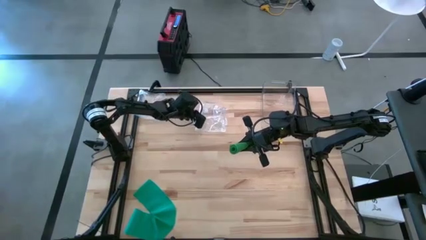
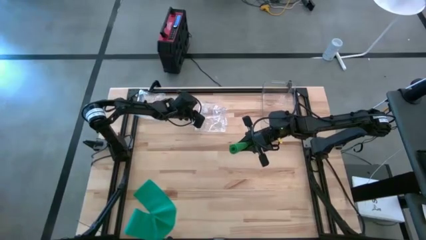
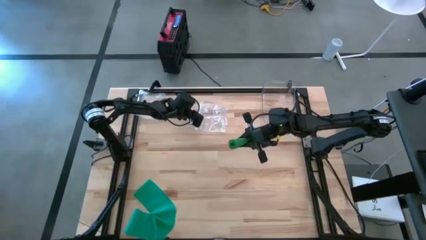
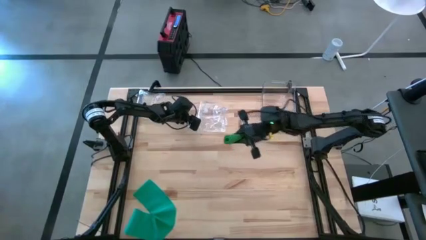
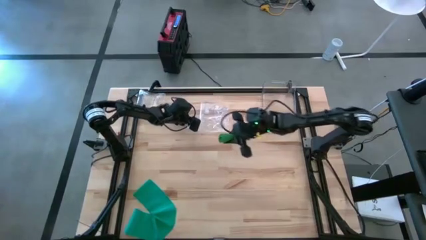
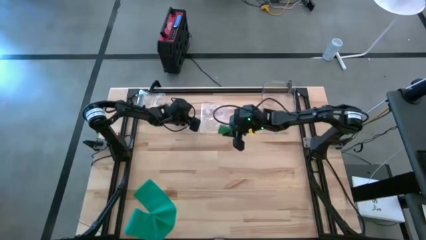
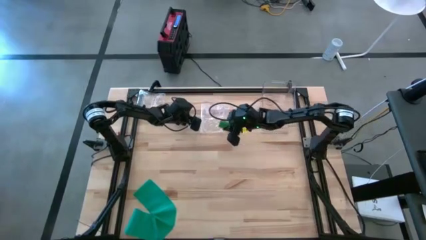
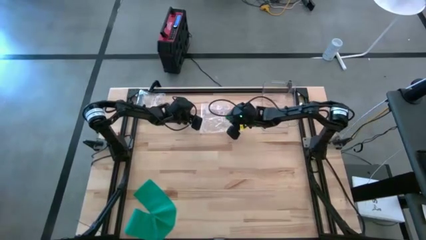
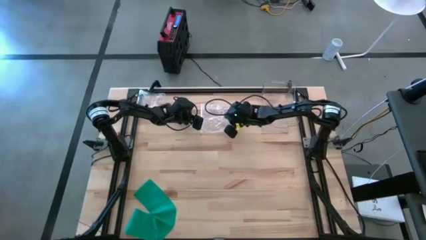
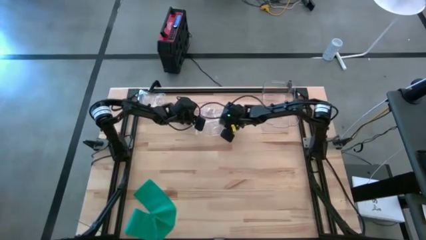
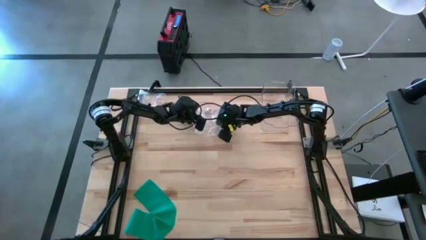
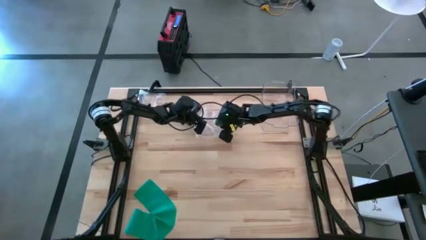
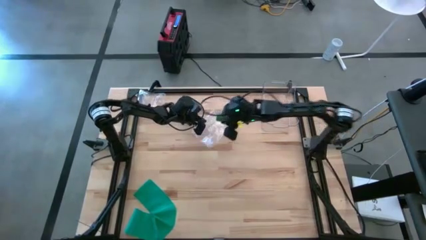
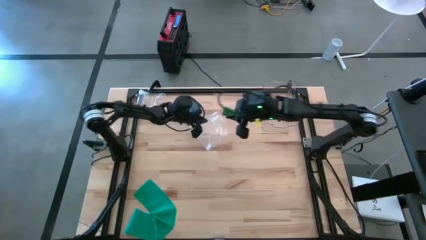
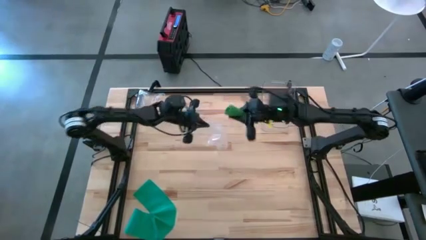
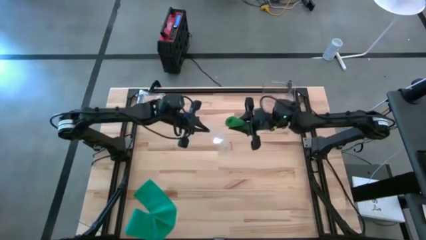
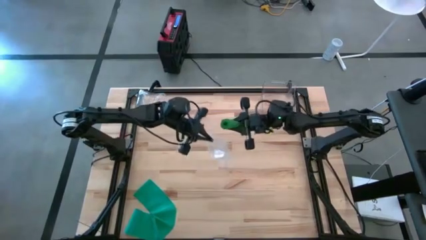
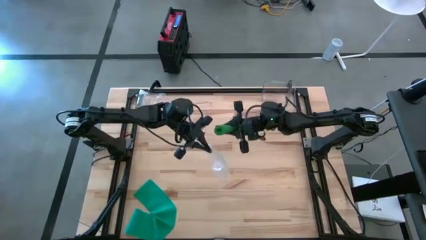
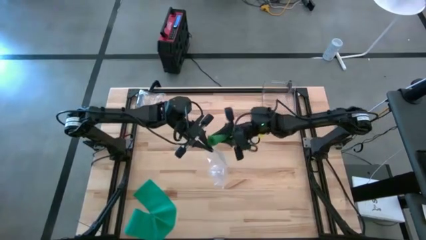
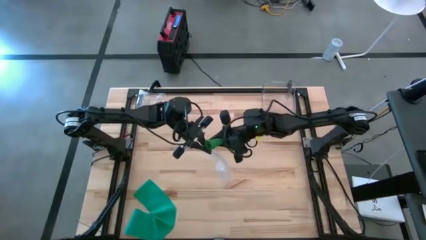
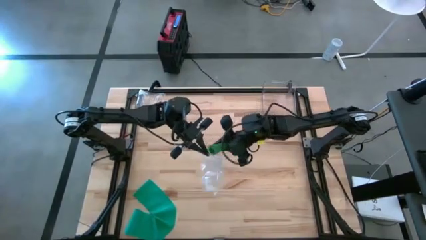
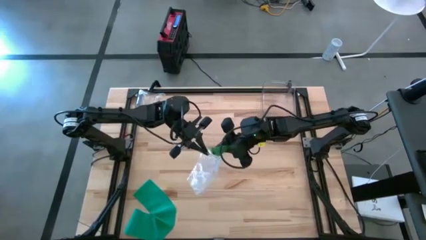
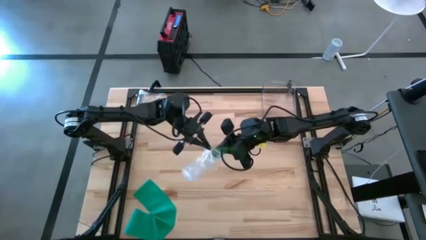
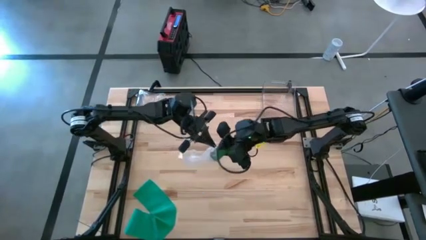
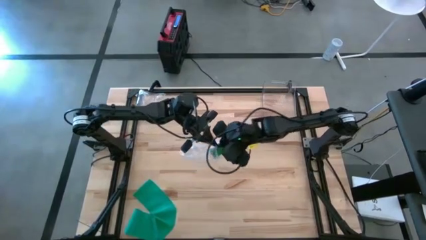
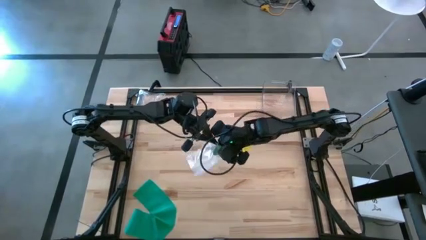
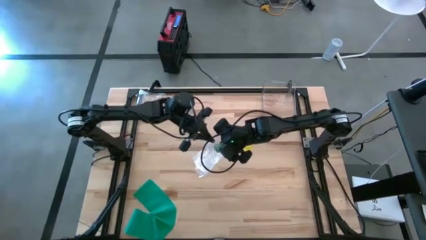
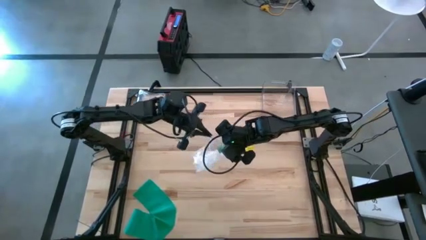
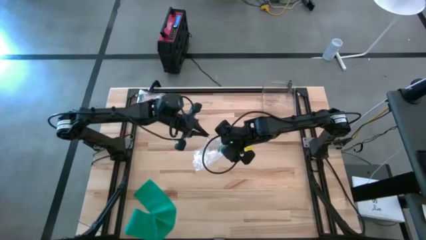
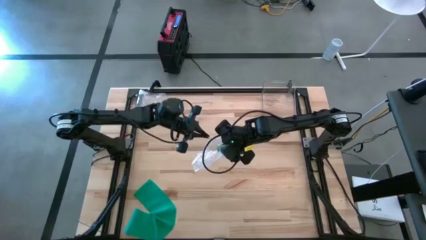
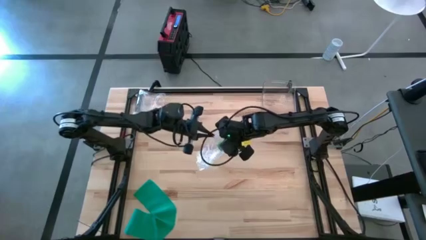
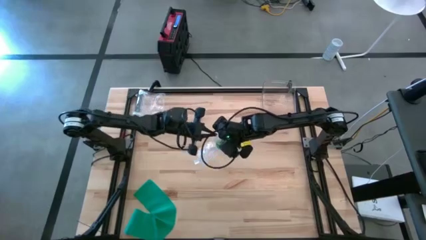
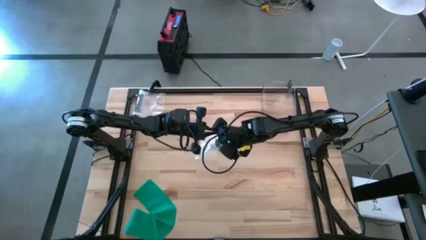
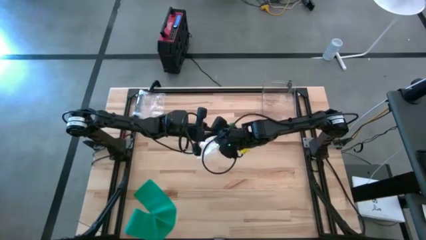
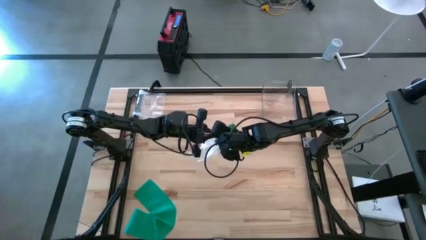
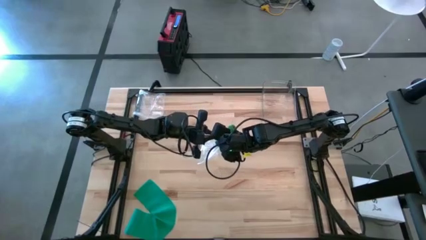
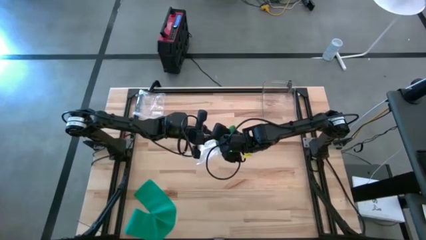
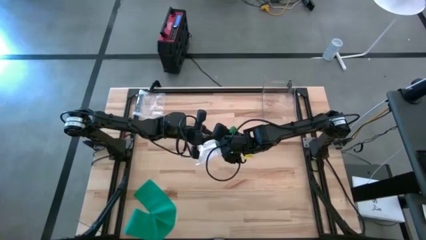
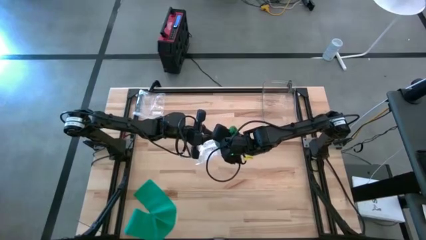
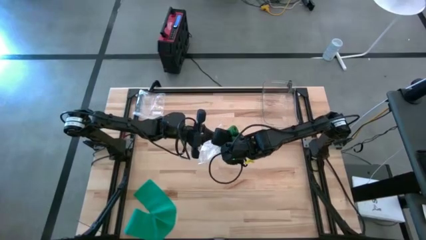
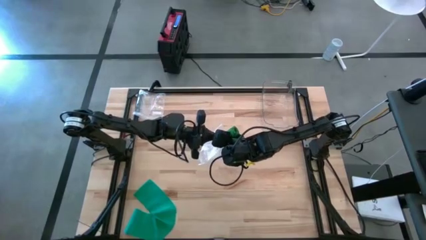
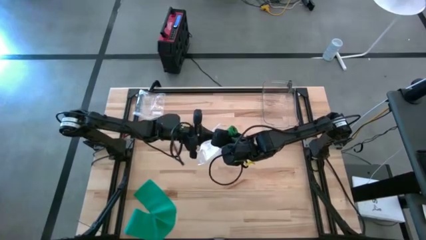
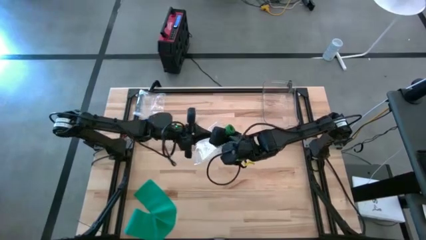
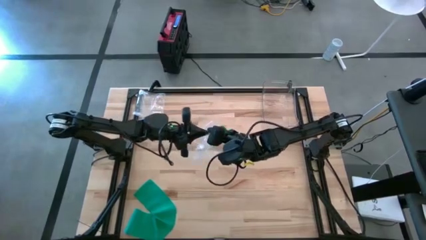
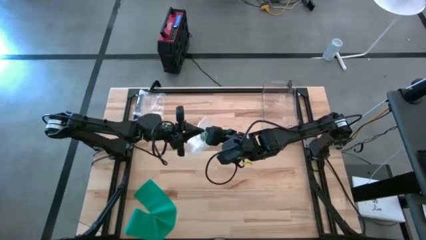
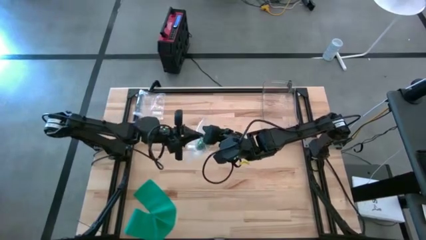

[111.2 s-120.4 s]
Task: Roll bandage
Put the rolled green bandage into the transparent zip bag

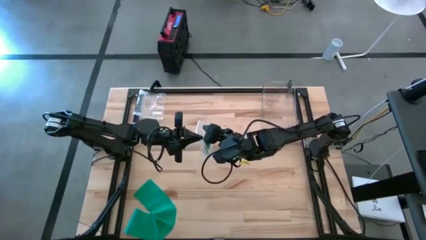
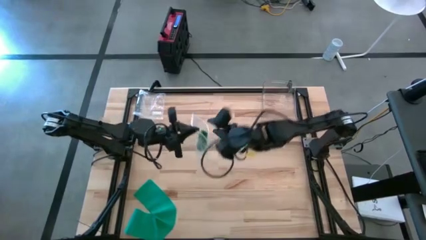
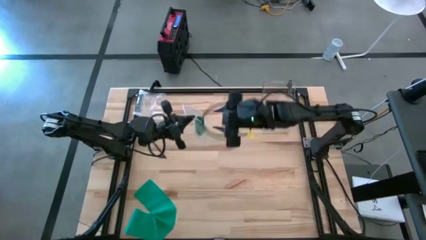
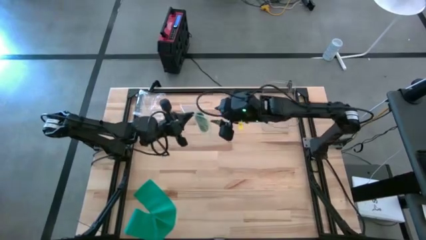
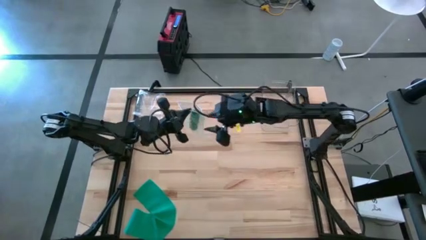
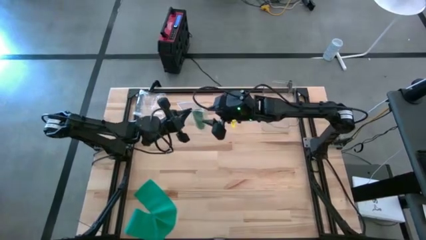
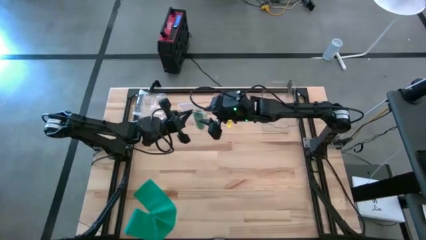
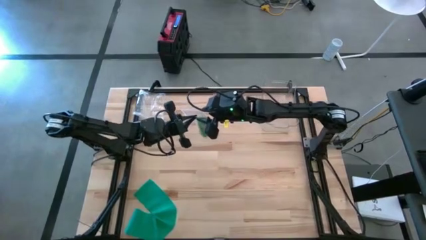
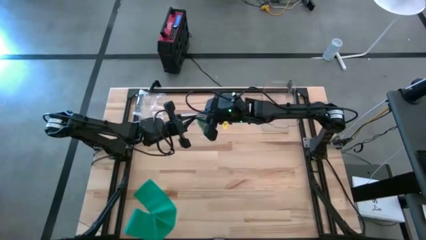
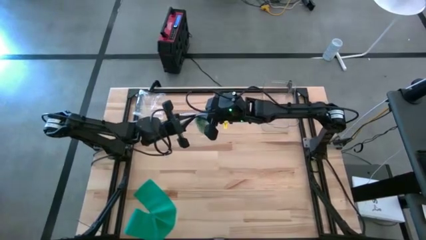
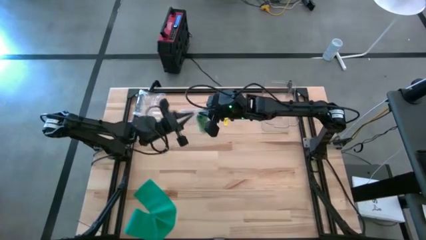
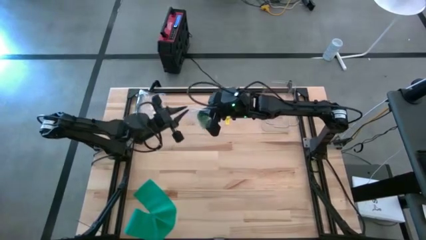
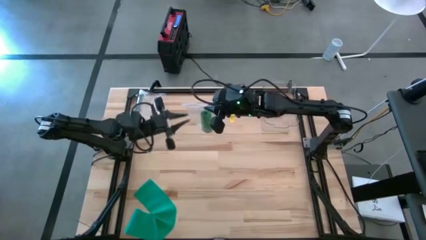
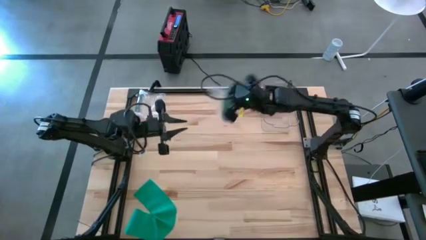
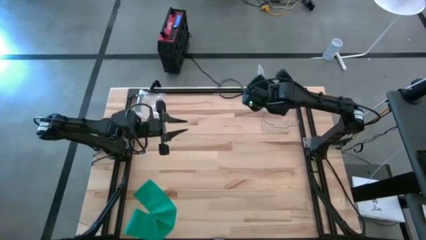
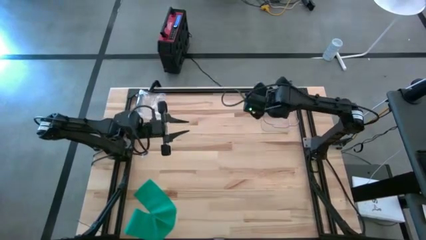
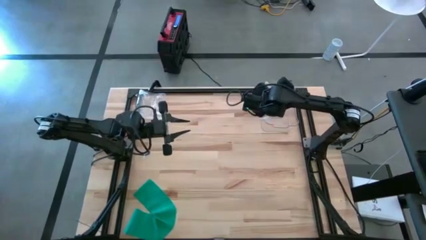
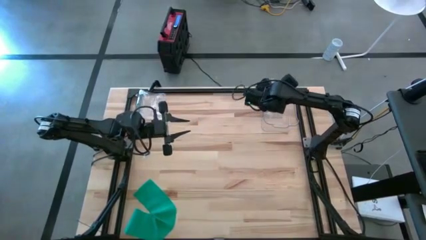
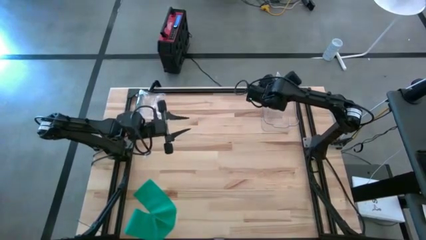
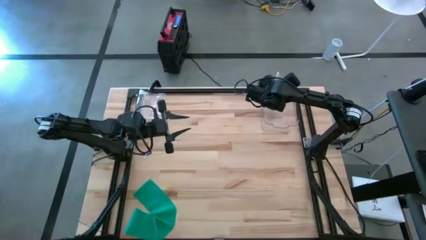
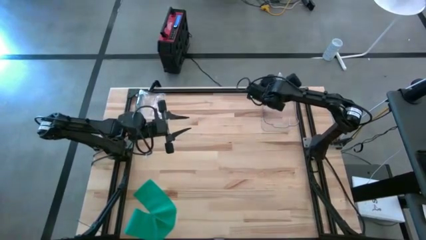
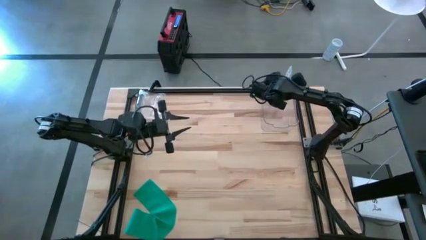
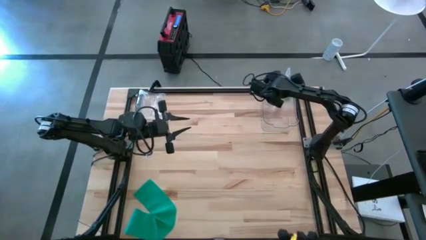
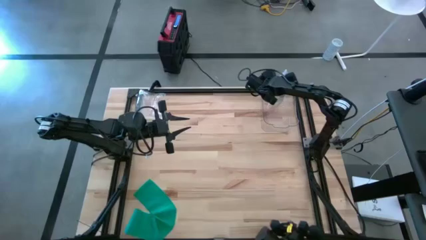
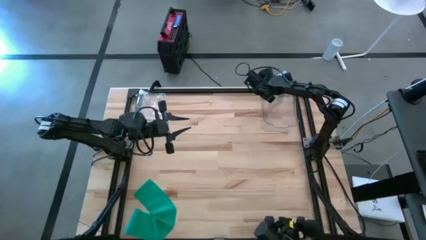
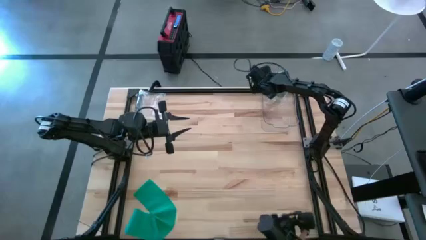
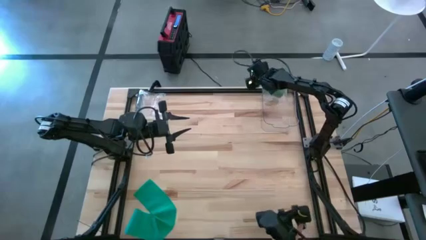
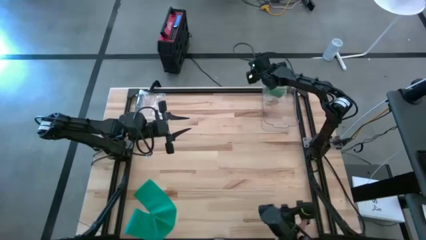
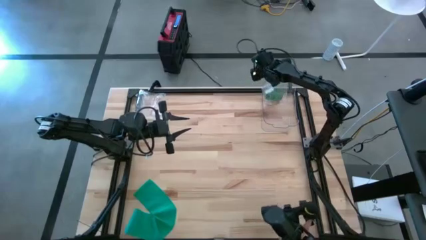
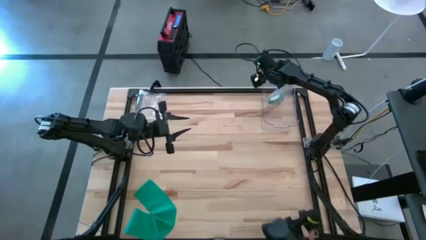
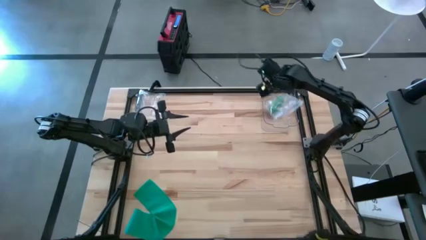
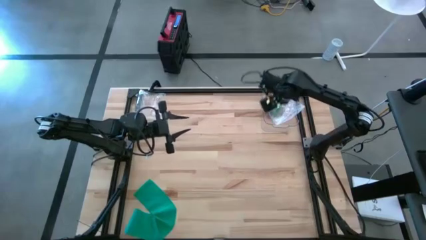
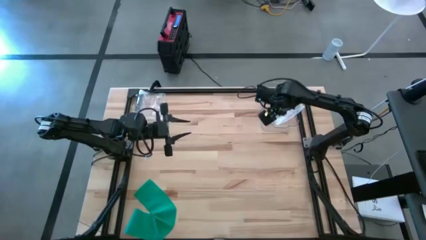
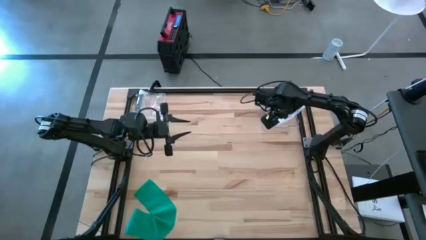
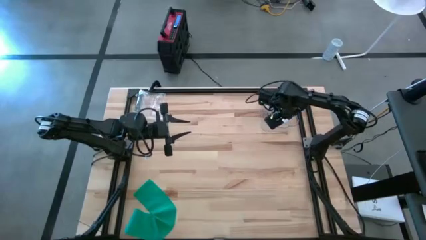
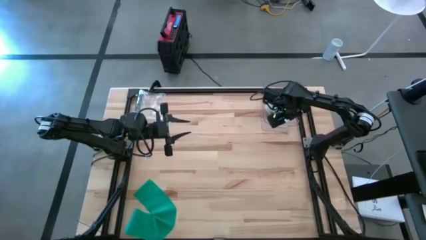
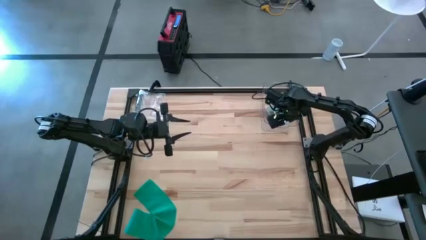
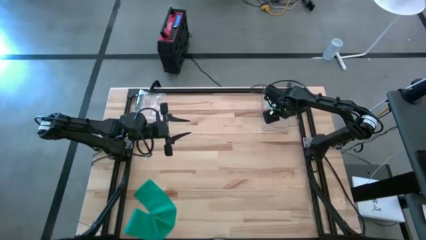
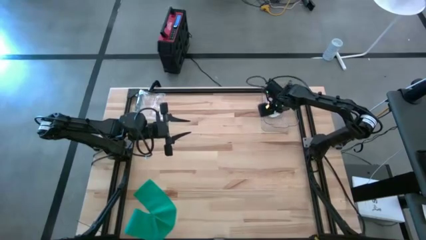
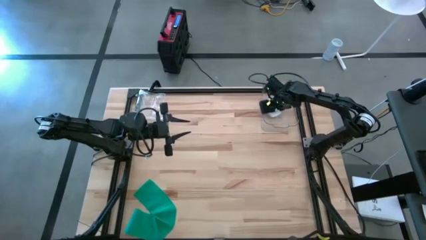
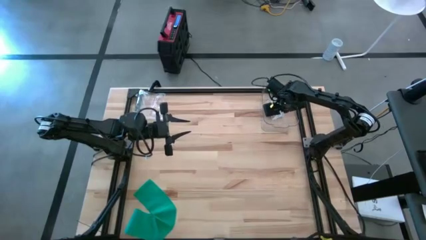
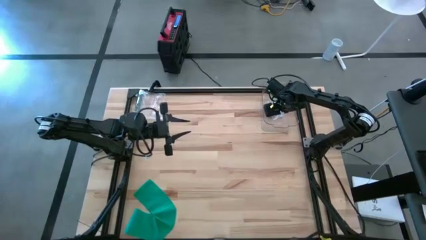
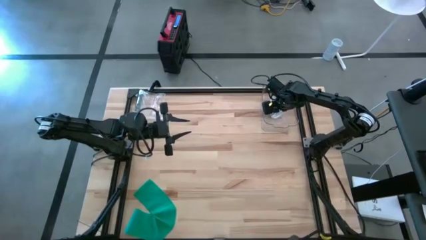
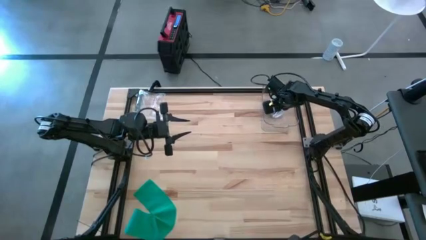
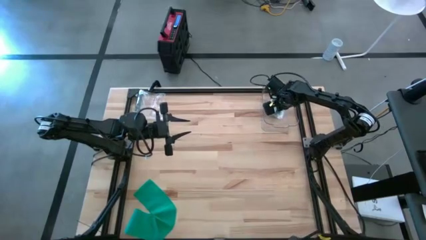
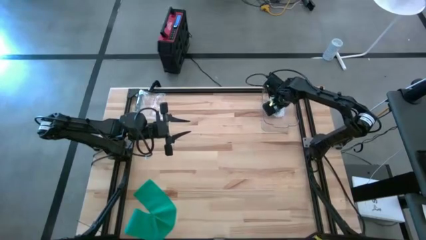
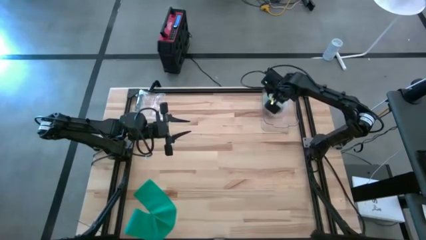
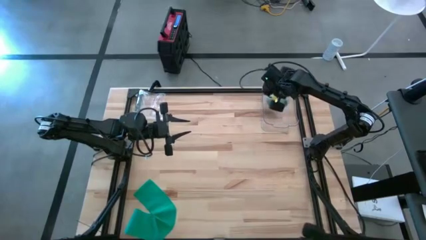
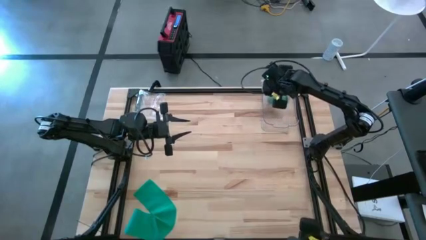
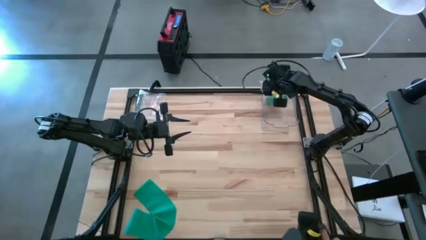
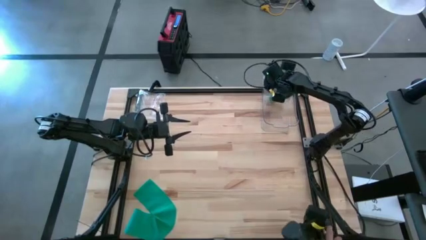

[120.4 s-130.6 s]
Put the transparent zip bag into the transparent bin
